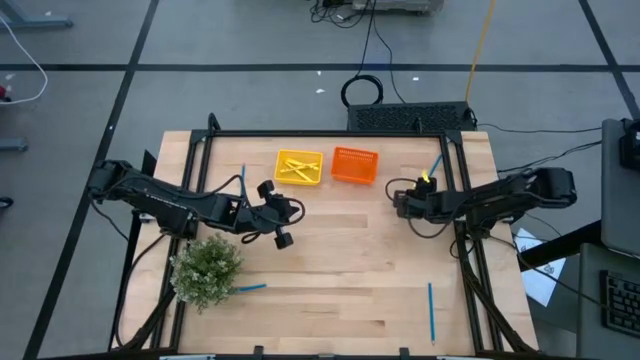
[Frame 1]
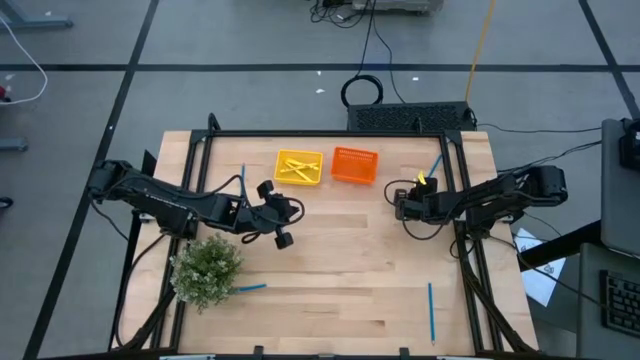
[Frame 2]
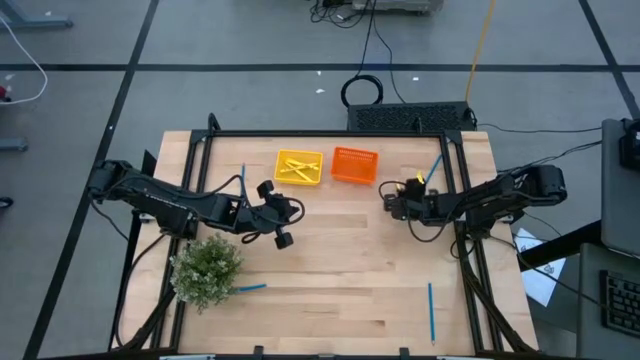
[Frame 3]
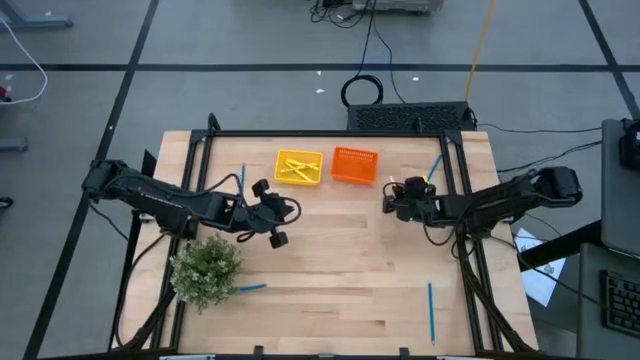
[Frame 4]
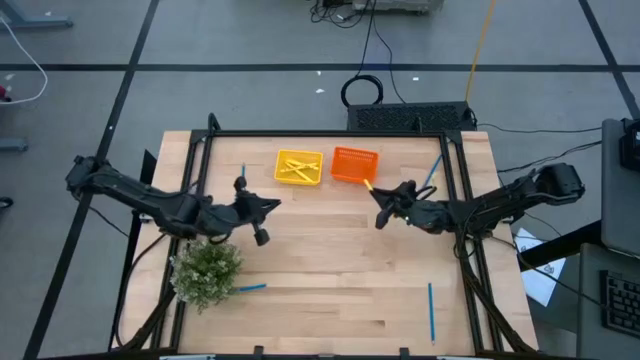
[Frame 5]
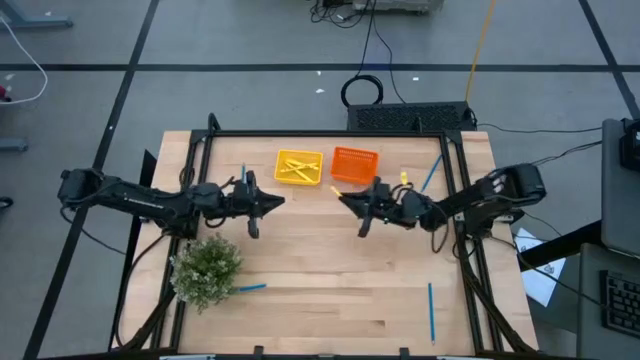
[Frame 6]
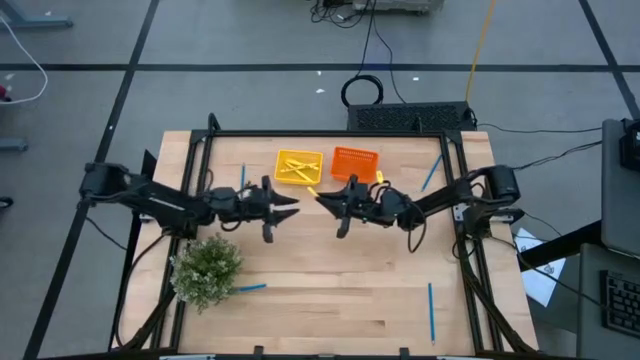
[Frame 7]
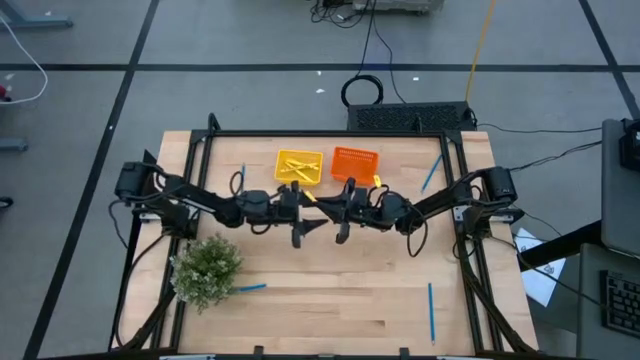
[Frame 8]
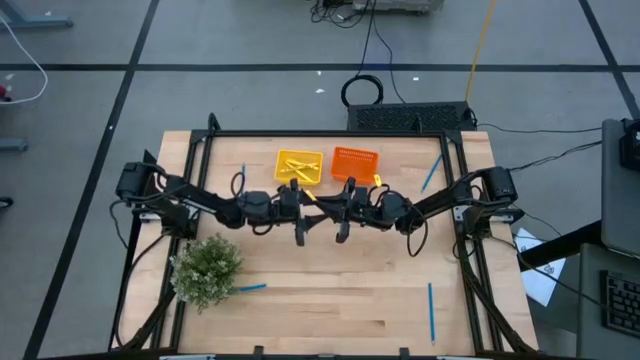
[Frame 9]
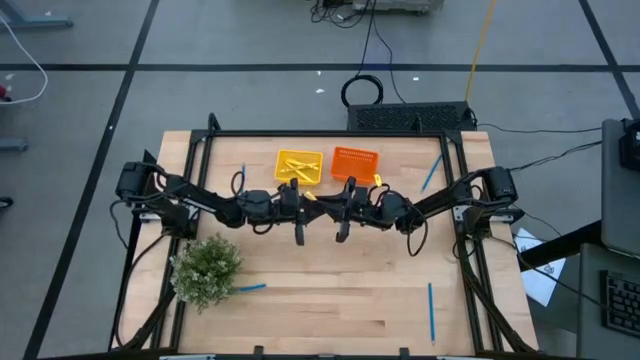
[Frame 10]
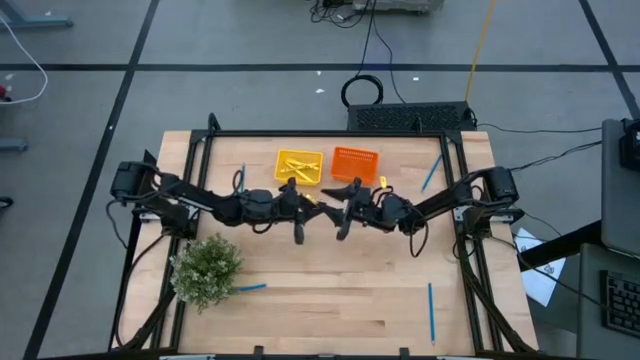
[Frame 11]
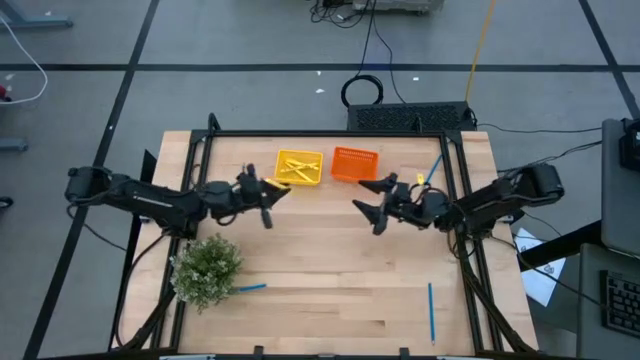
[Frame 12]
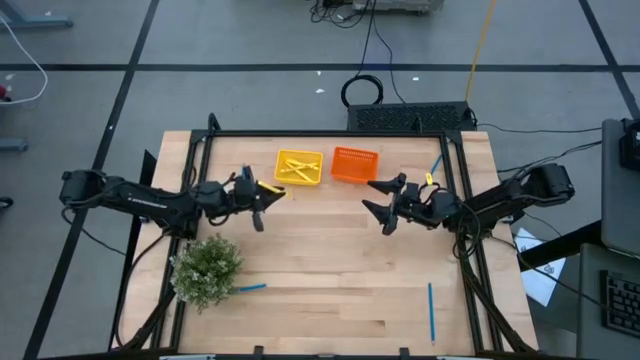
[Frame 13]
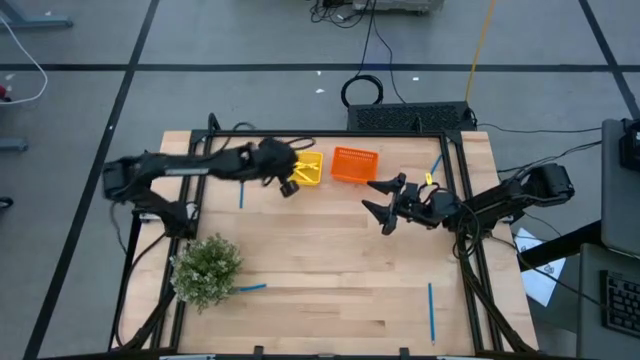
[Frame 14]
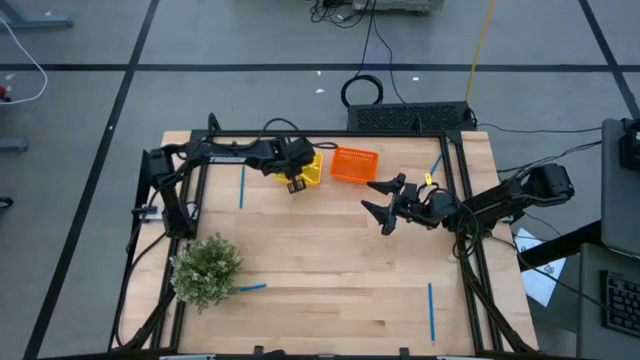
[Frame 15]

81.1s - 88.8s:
Task: Sort pens & pencils
Put the yellow pen into the yellow bin

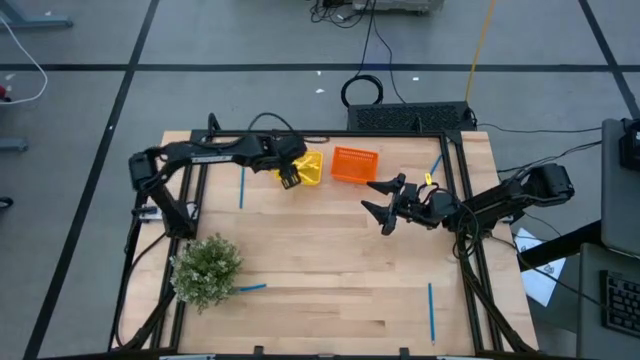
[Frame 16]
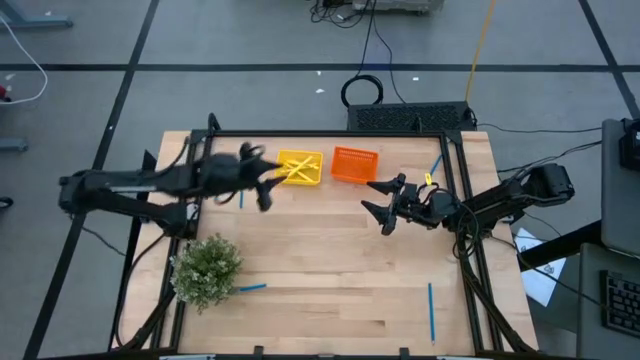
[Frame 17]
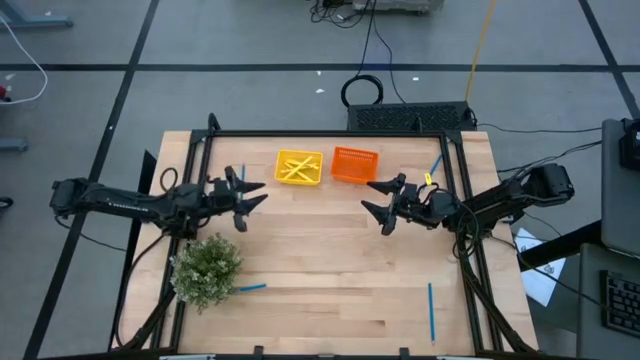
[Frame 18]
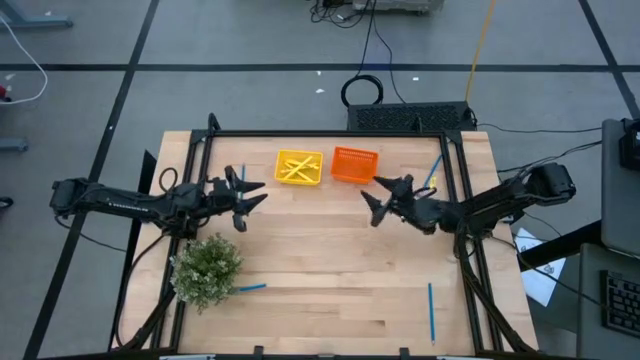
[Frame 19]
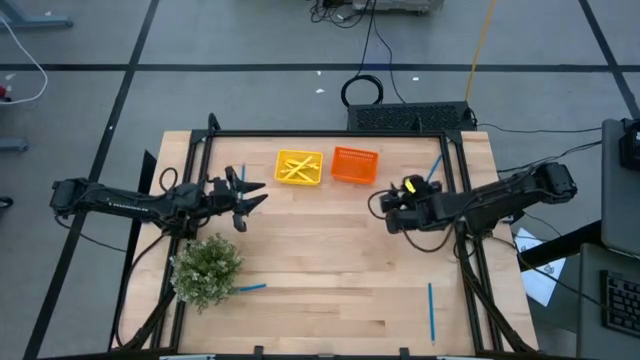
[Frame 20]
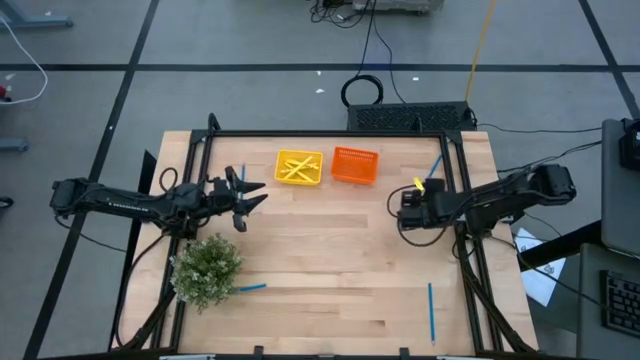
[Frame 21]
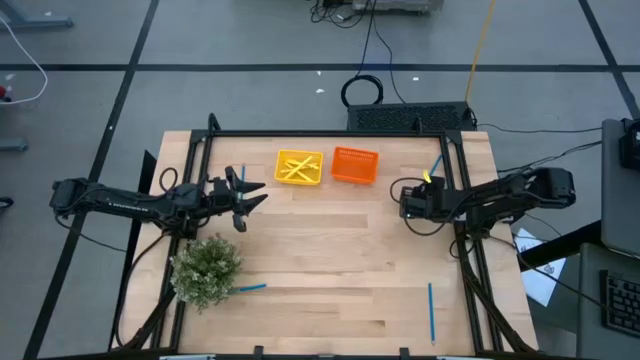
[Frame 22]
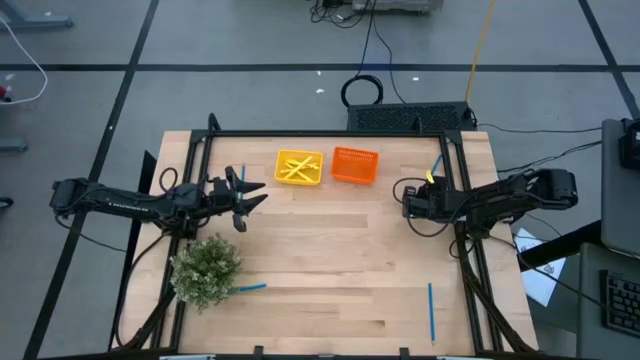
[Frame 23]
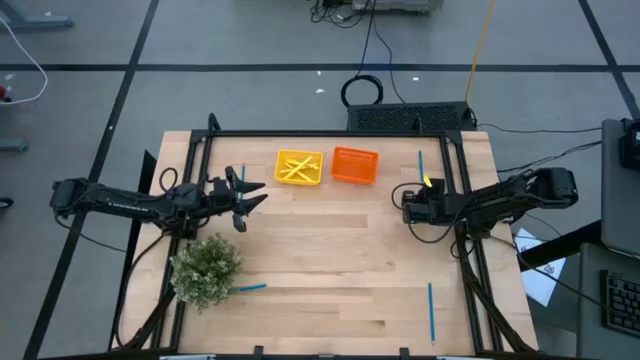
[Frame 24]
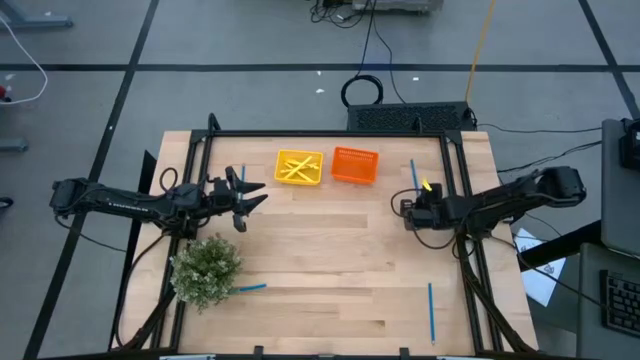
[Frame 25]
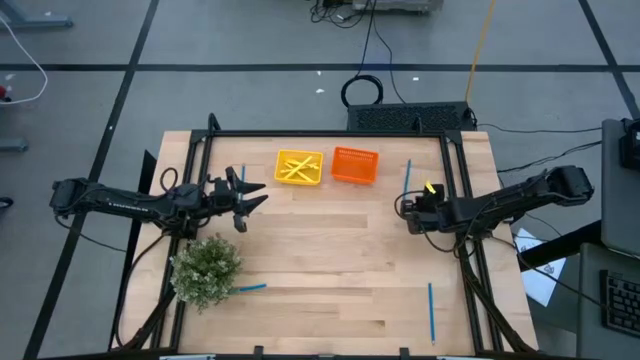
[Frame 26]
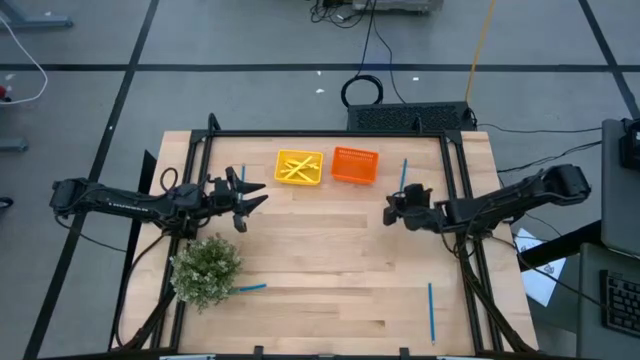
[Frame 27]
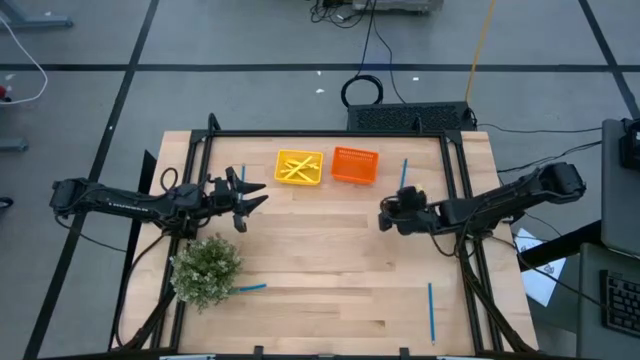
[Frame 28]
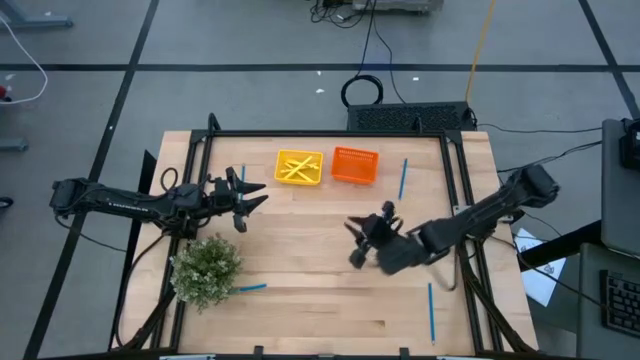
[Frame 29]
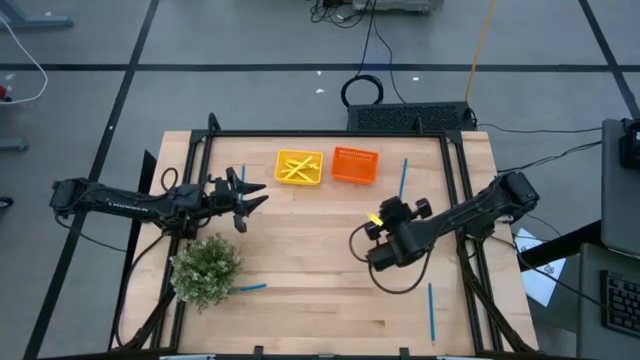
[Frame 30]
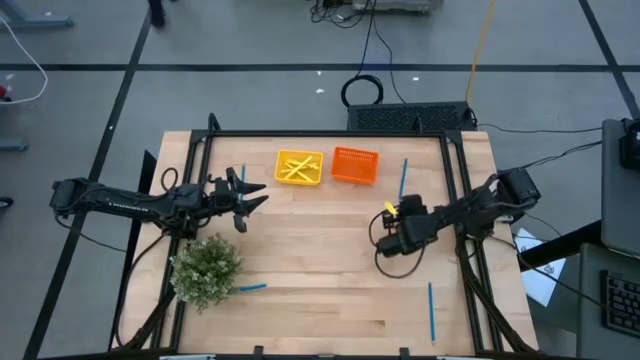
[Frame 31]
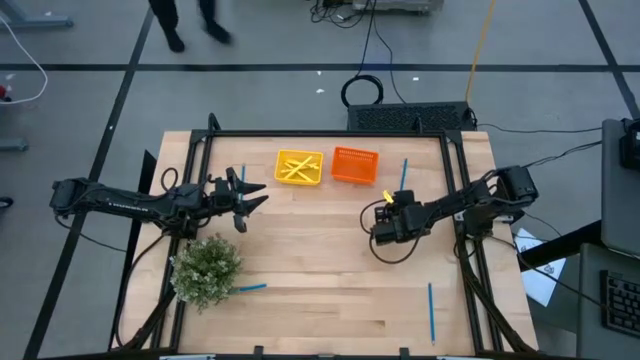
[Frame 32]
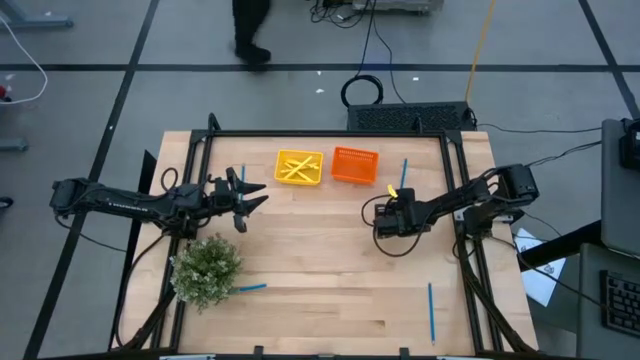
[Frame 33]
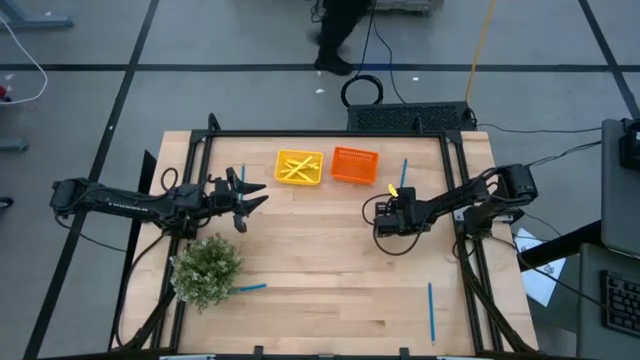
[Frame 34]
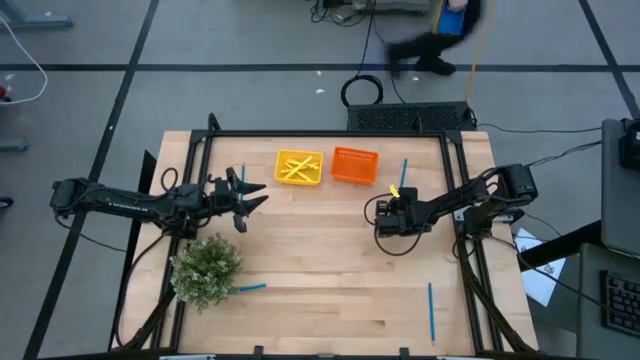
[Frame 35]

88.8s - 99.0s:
Put the top right blue pencil into the orange bin

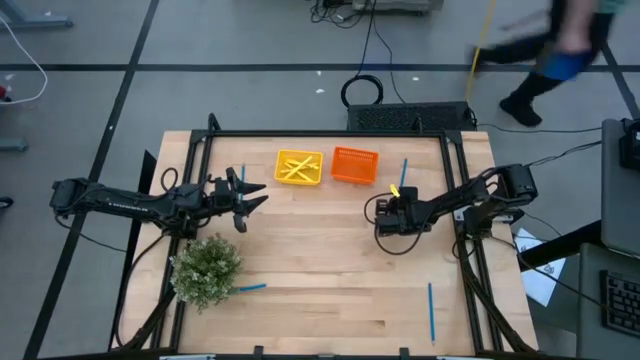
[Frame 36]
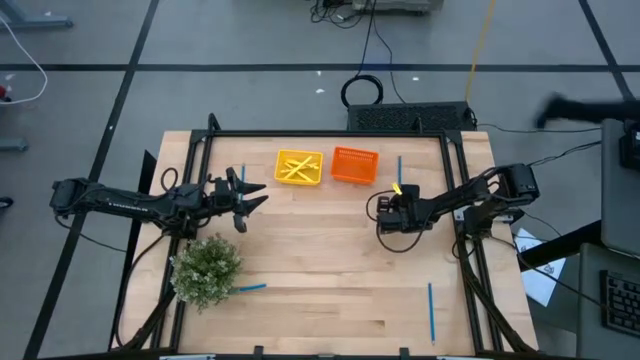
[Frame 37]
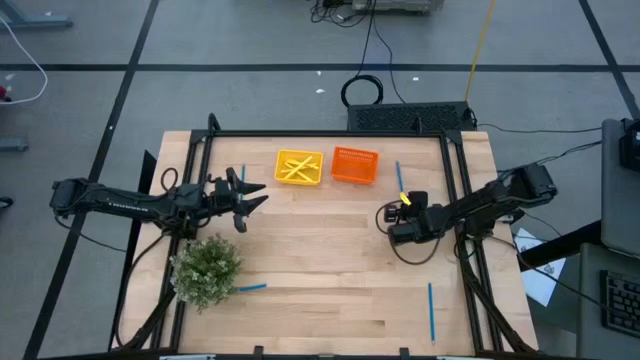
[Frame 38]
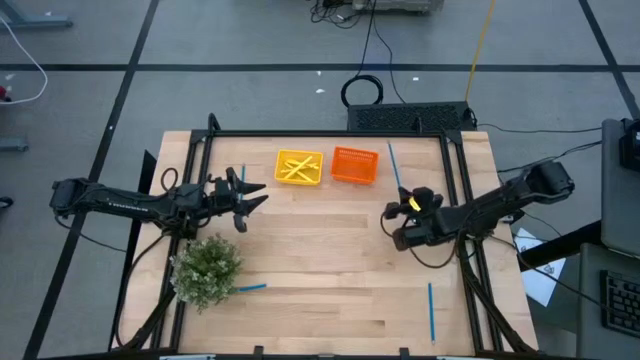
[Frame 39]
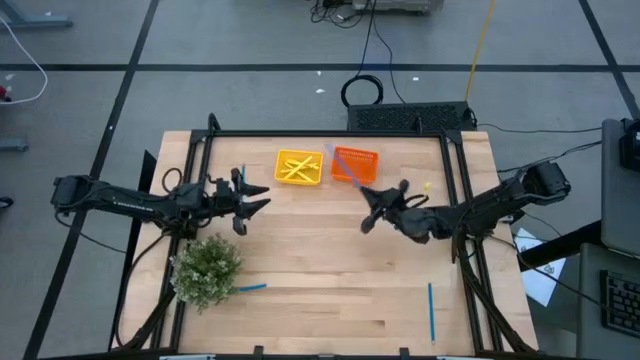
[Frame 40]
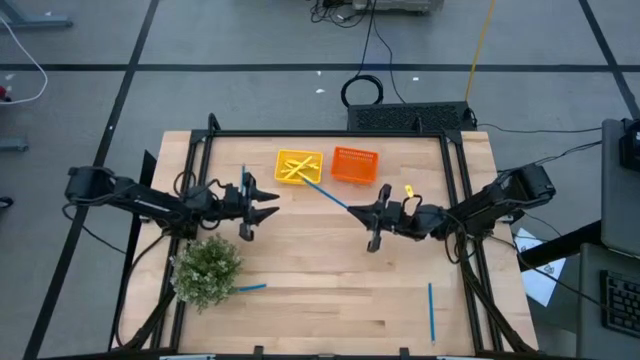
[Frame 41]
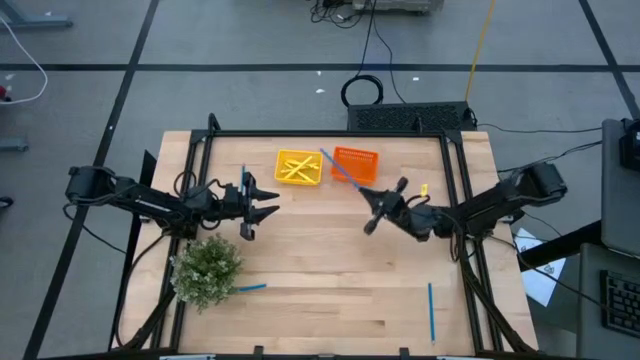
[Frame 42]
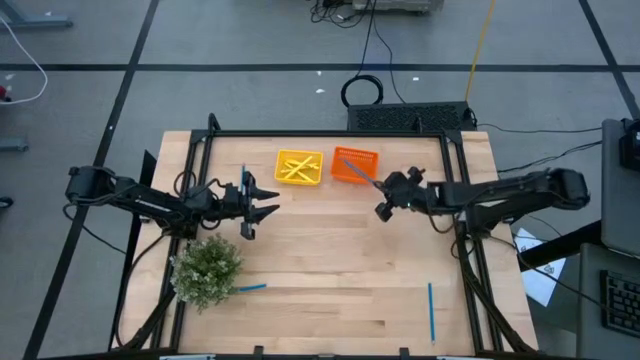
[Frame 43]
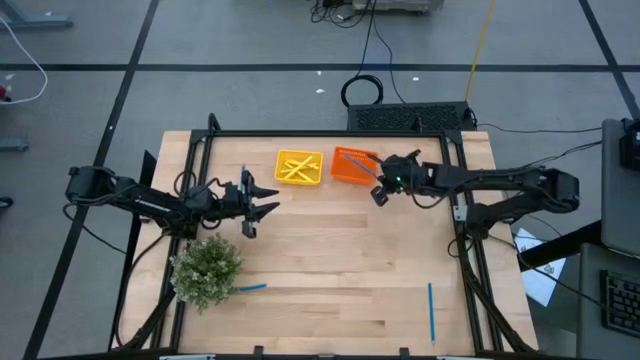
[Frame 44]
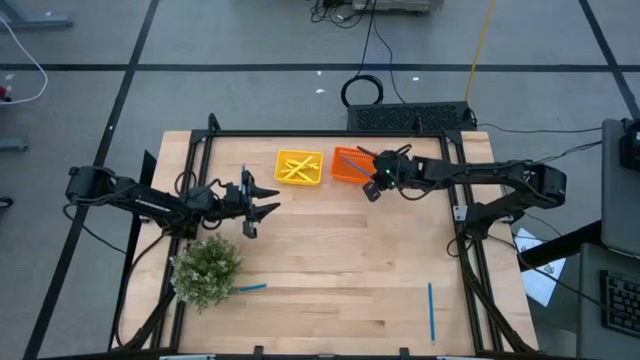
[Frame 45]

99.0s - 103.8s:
Put the top right blue pencil into the orange bin

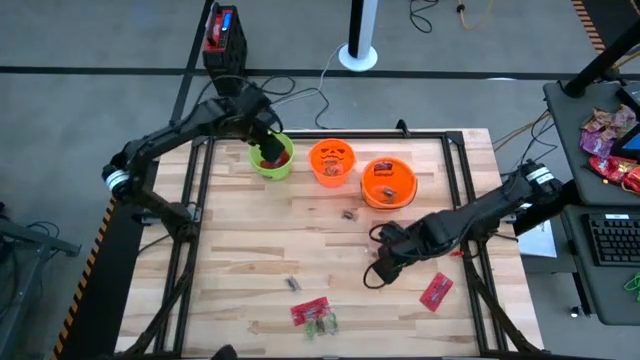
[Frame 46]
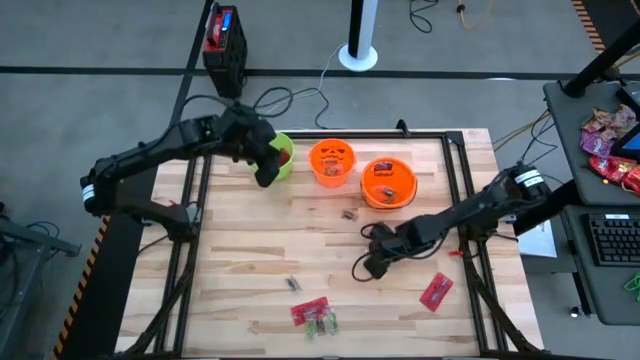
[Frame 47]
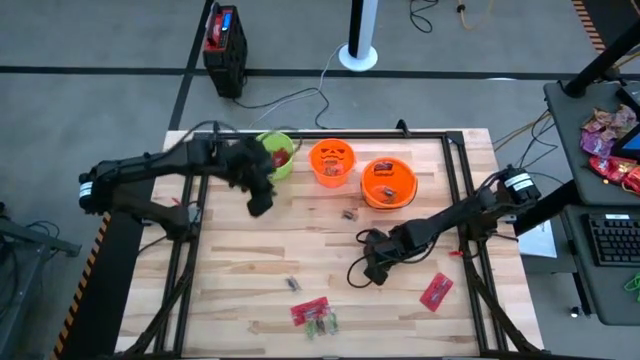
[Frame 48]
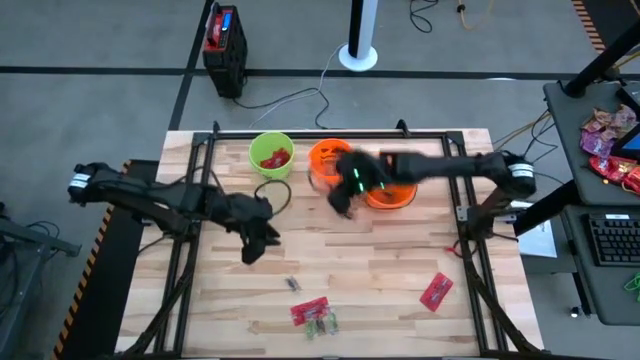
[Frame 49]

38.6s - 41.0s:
Task: Sort candy by brand, put in halloween buckets
Put the orange gummy into the left orange bucket
